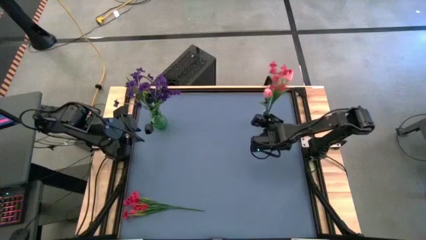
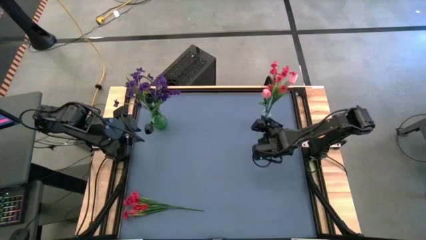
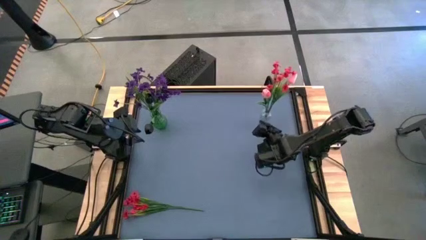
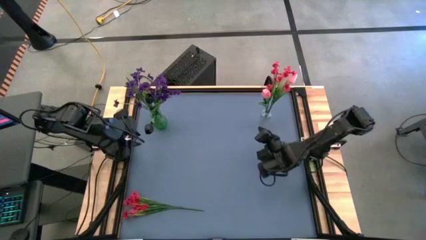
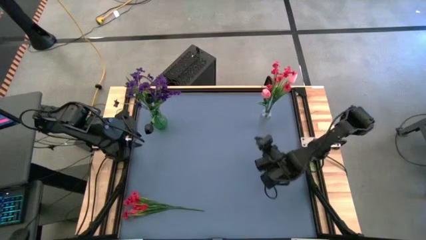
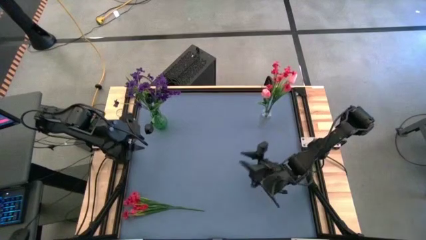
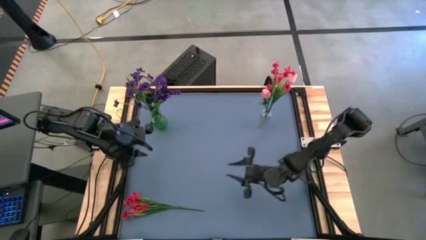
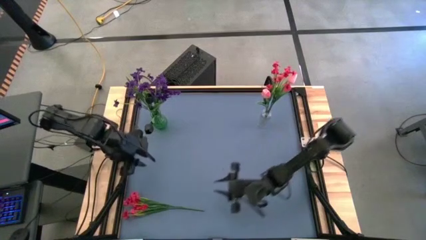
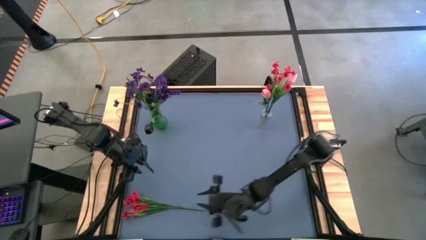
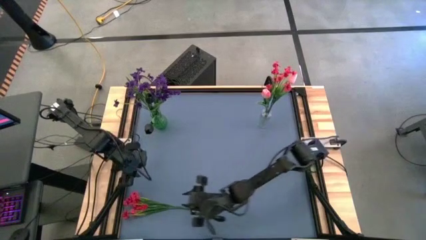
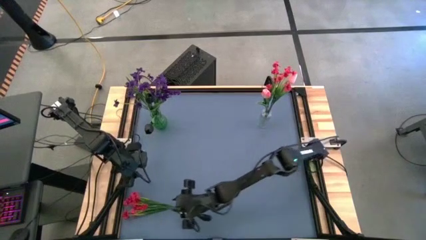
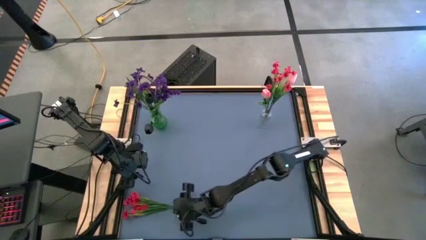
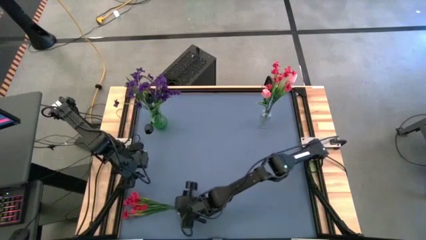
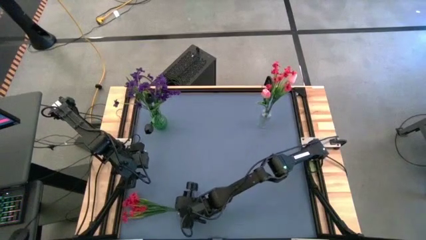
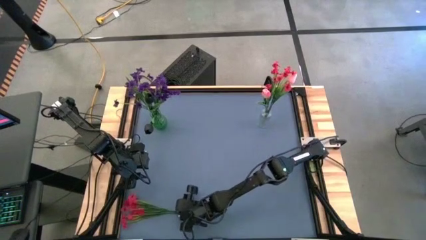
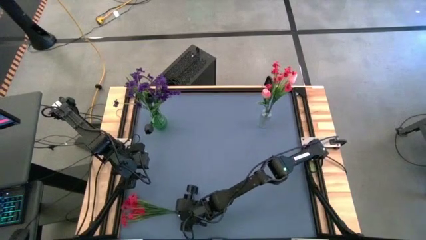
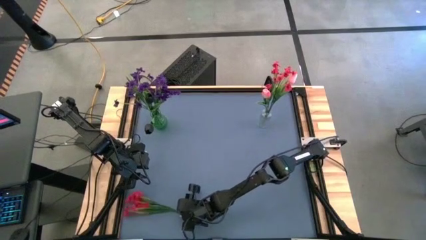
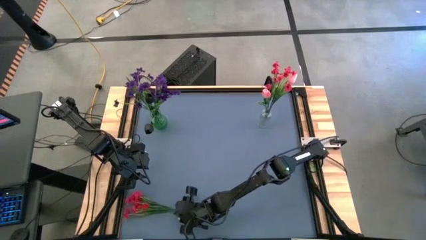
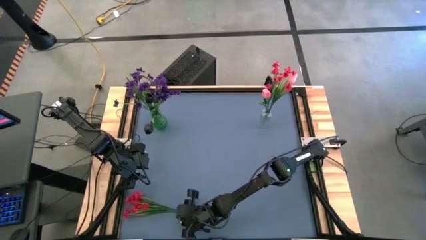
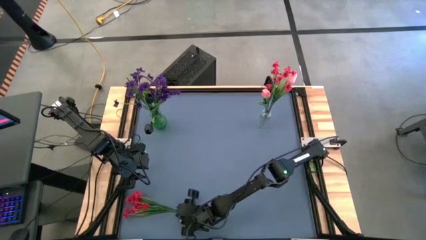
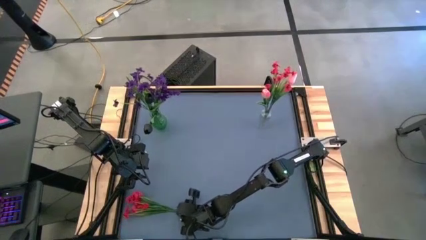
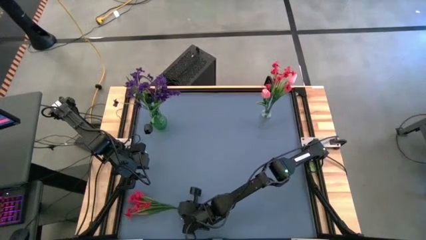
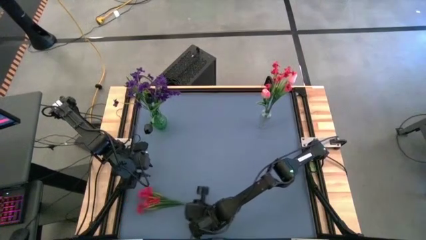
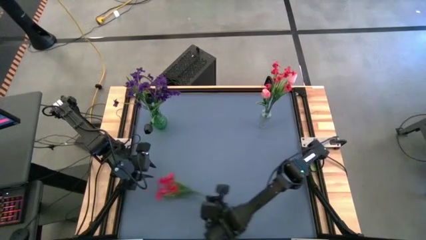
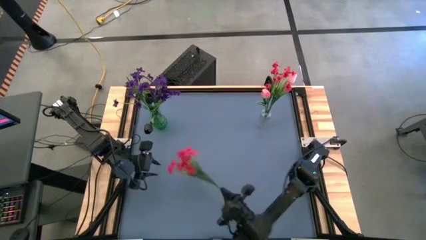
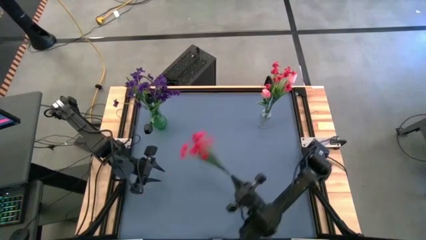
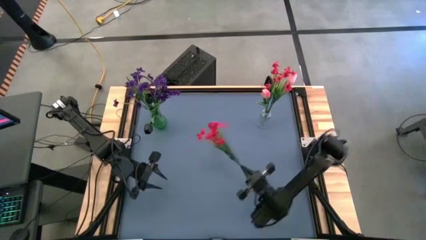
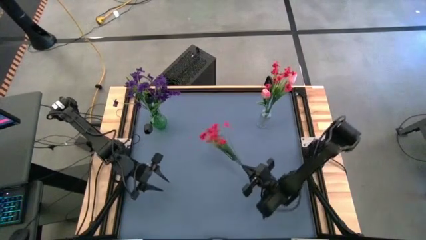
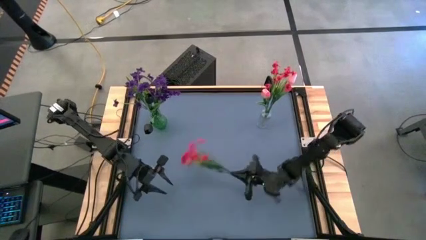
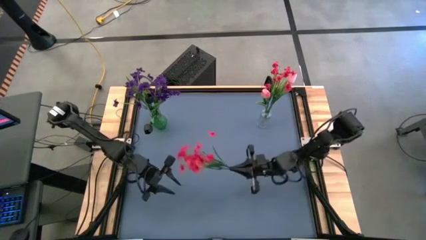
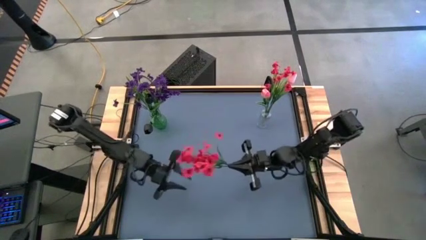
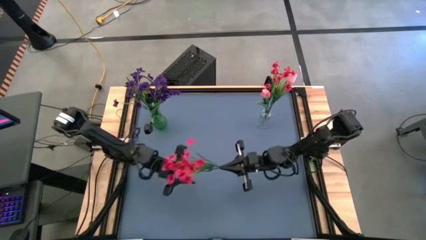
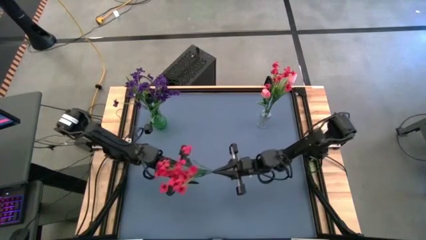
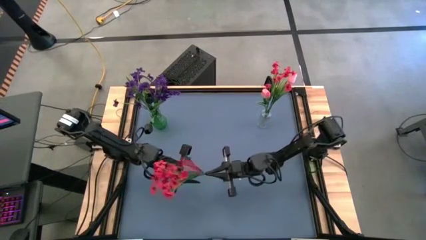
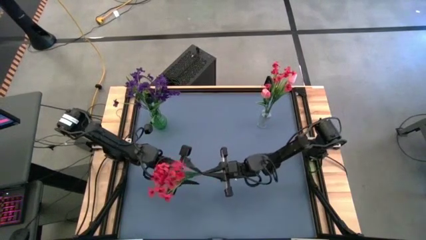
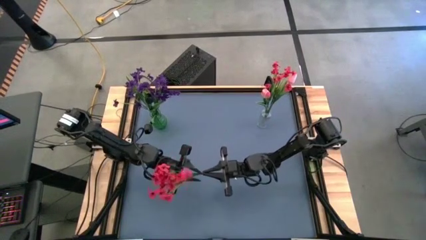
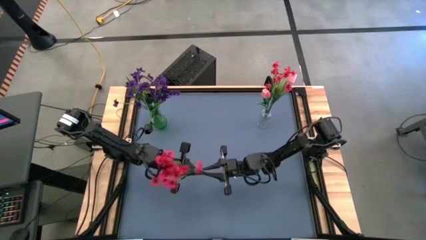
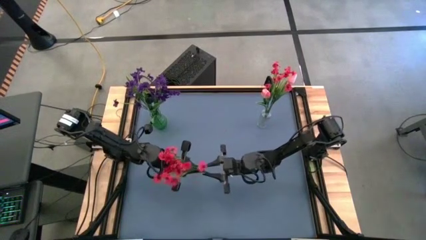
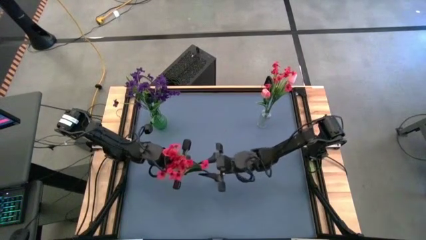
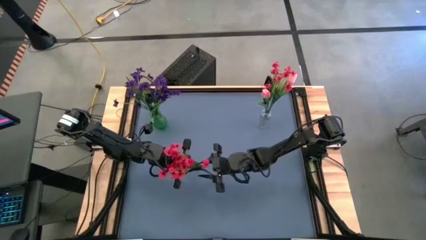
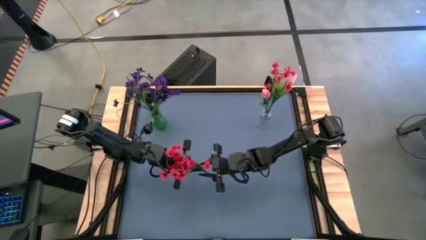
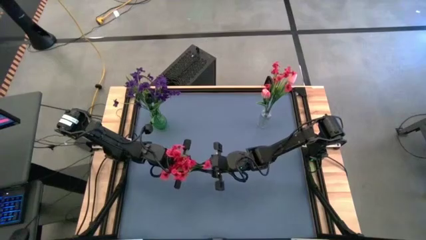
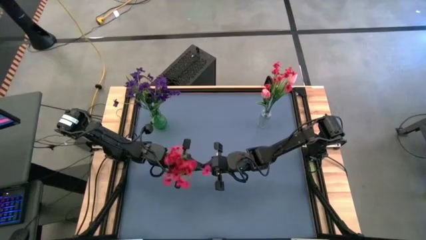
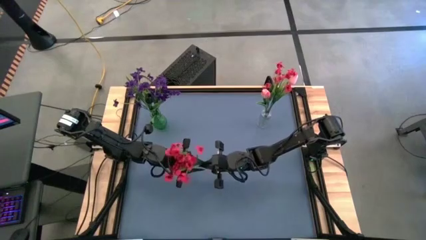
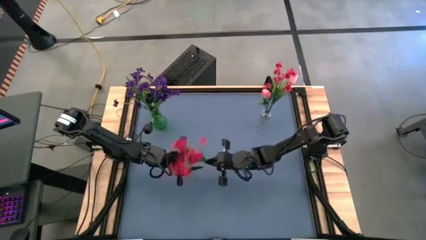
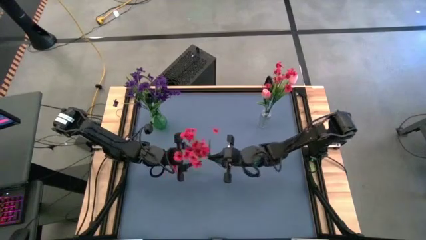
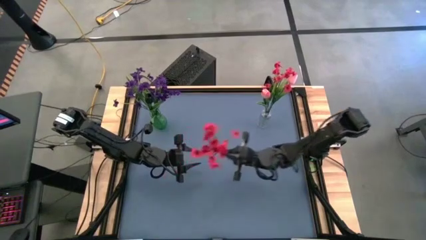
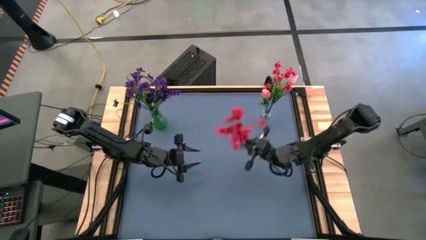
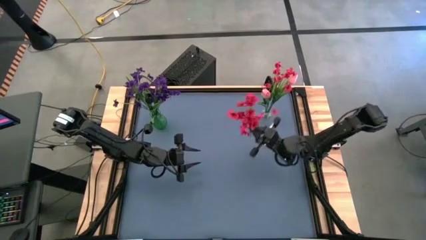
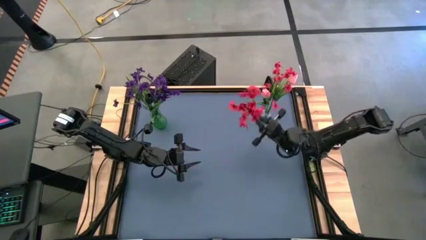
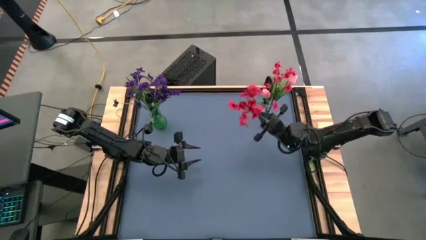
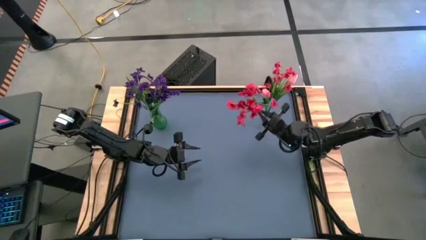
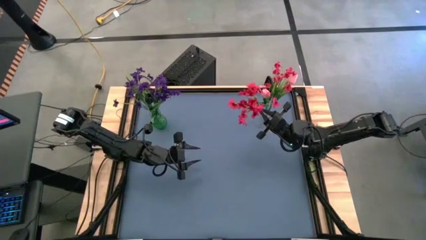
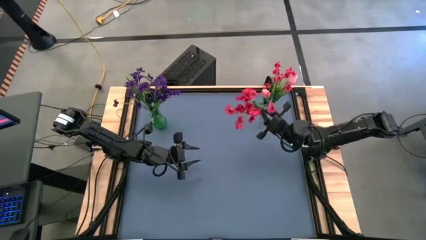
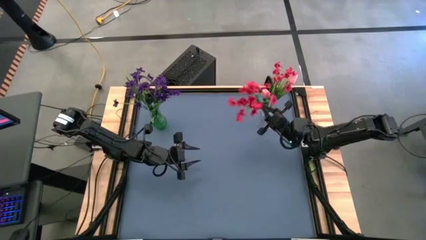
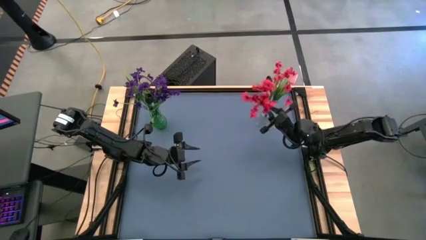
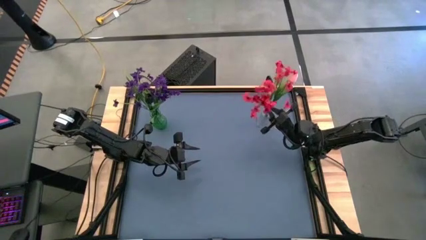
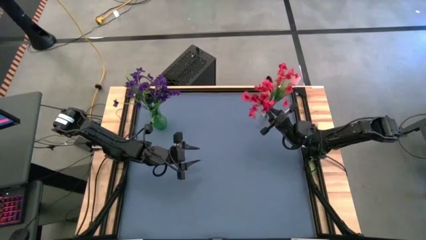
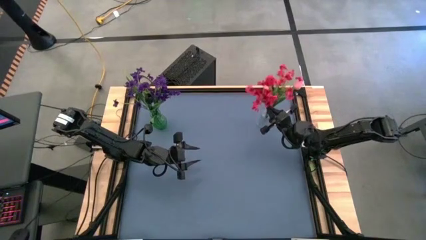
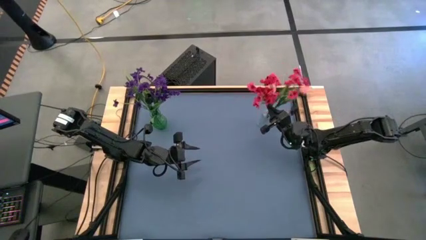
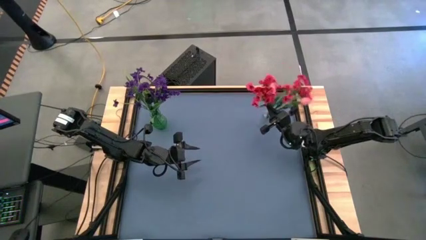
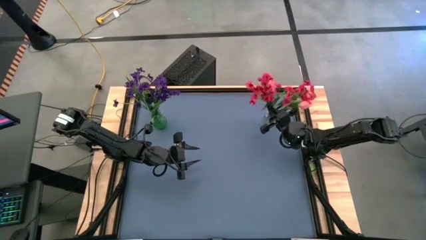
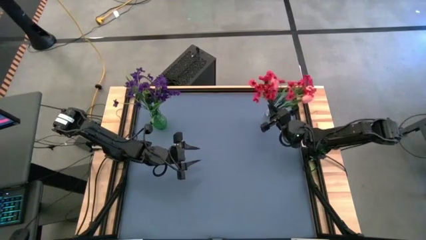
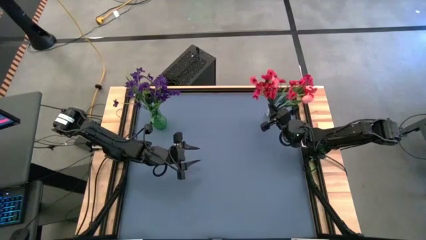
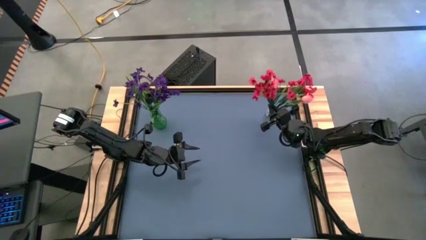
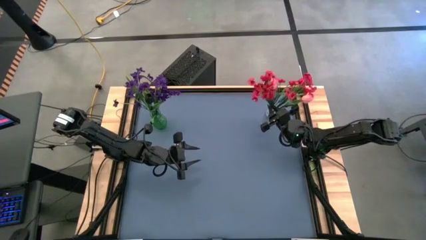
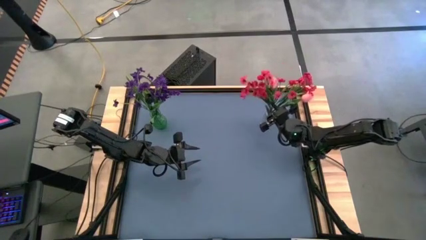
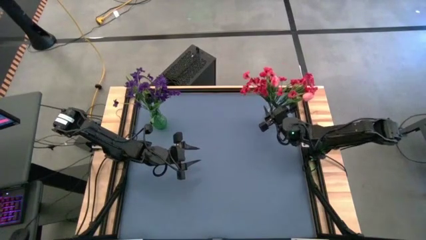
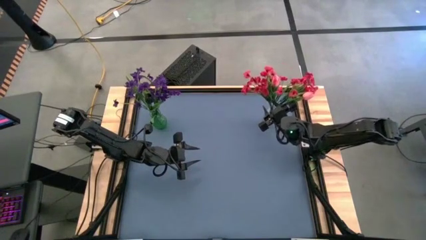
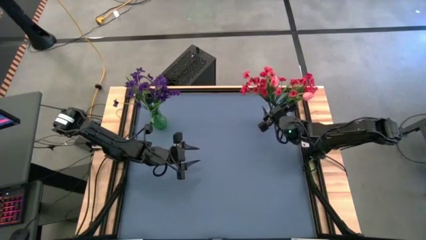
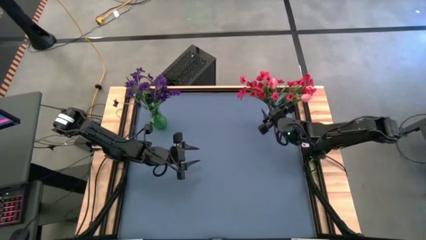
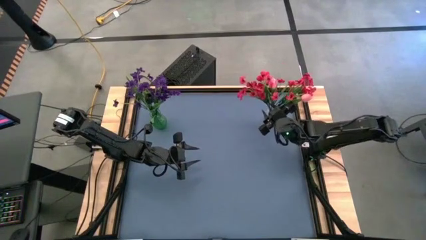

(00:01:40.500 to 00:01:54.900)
Task: Sort flowers into vase by color
Put the red flowers into the transparent vase

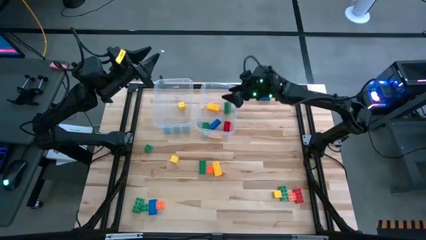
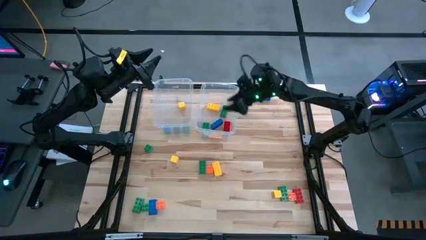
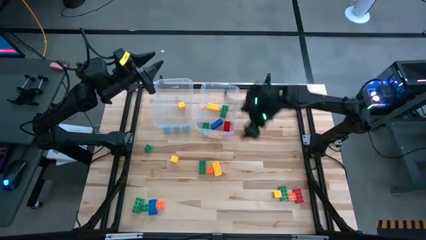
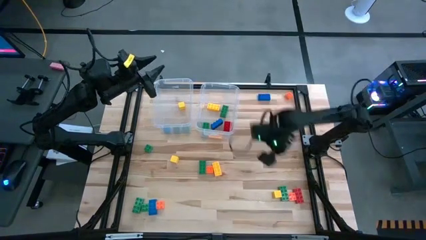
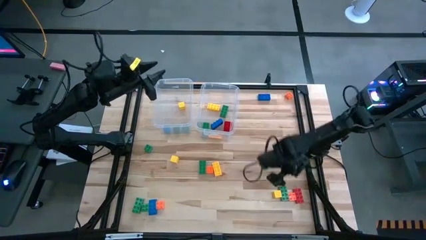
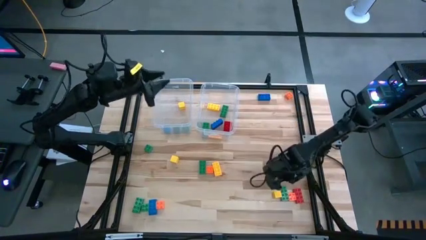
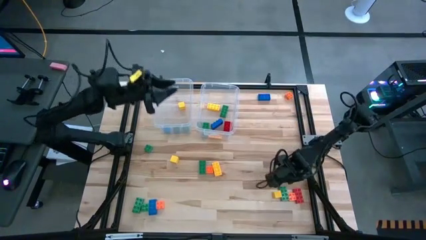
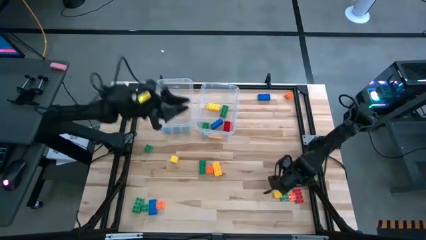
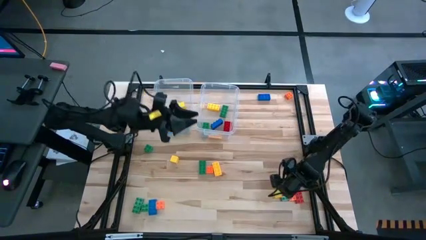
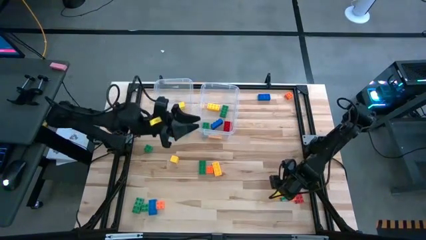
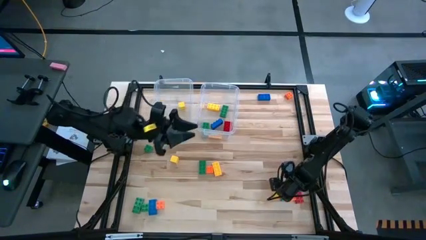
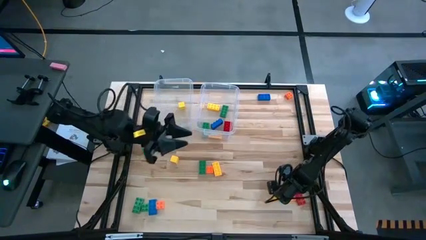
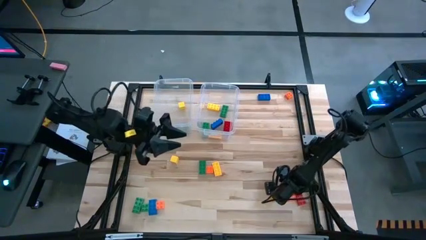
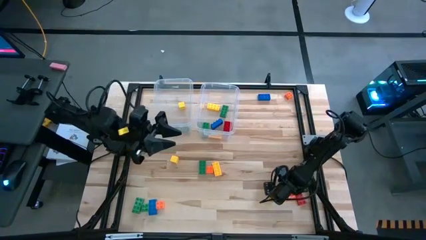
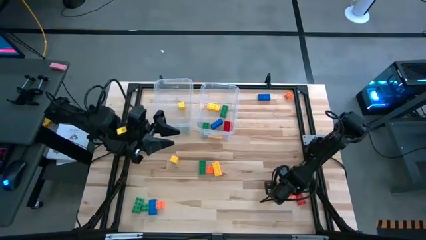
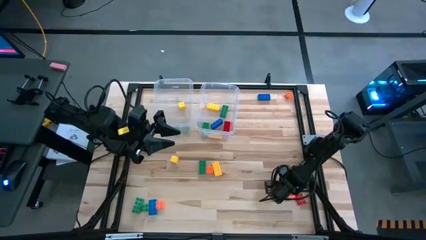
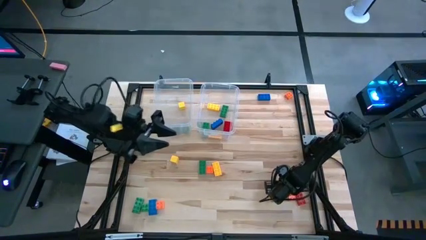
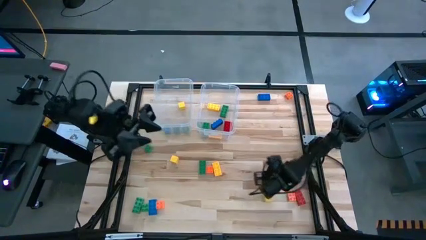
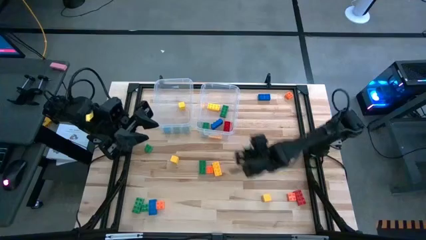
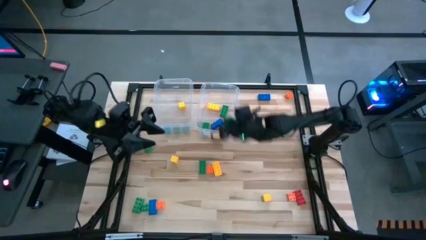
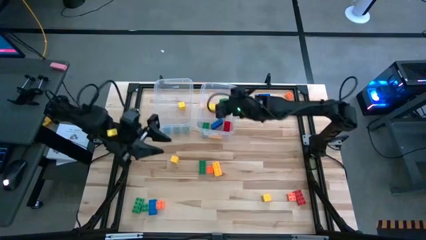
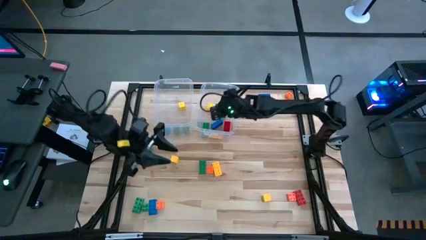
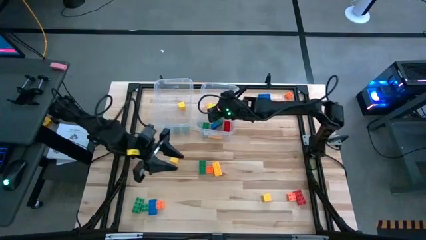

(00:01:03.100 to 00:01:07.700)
Task: Sort blocks by size
Put the green big game piece into the left transparent bin
